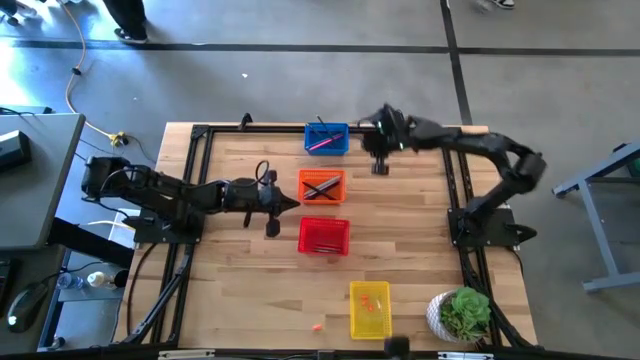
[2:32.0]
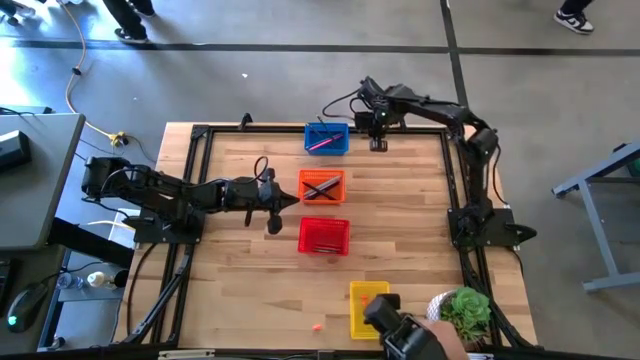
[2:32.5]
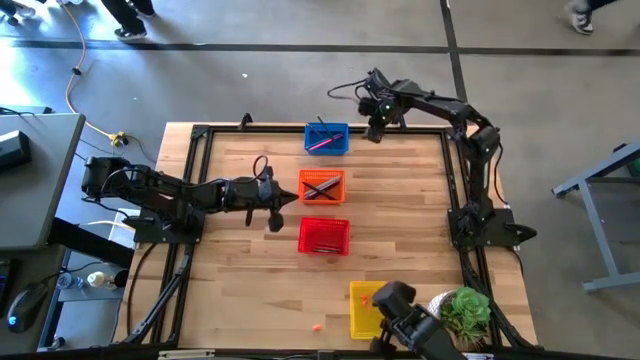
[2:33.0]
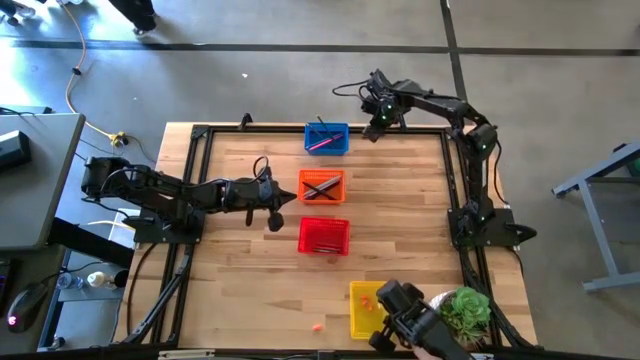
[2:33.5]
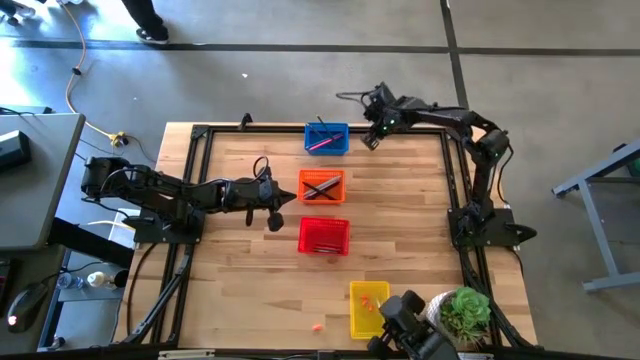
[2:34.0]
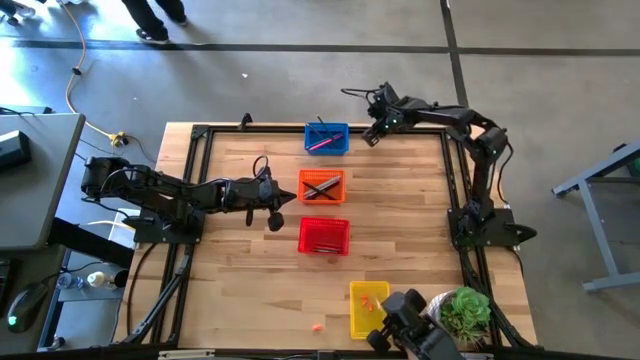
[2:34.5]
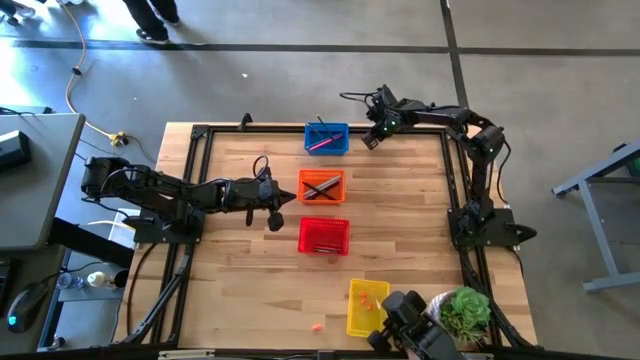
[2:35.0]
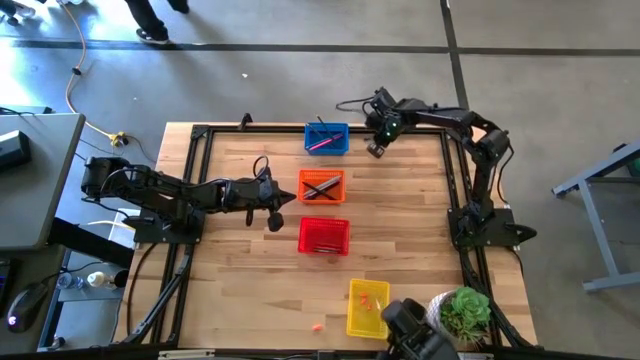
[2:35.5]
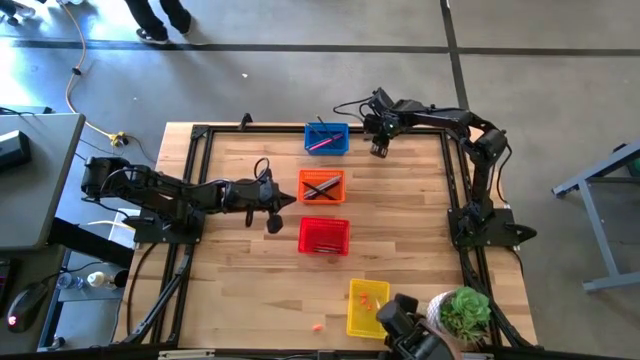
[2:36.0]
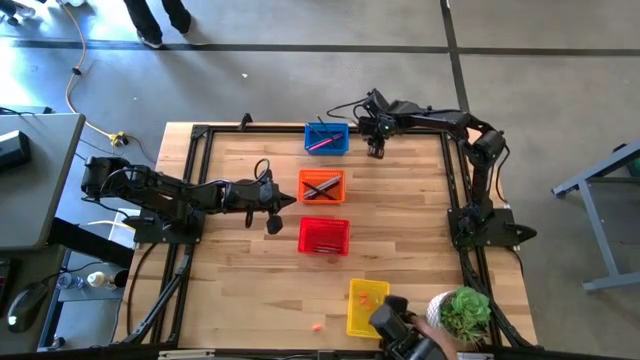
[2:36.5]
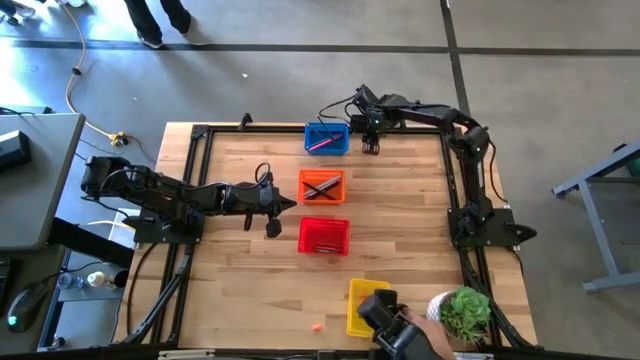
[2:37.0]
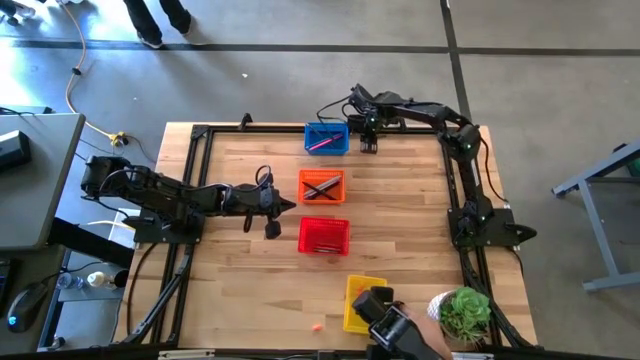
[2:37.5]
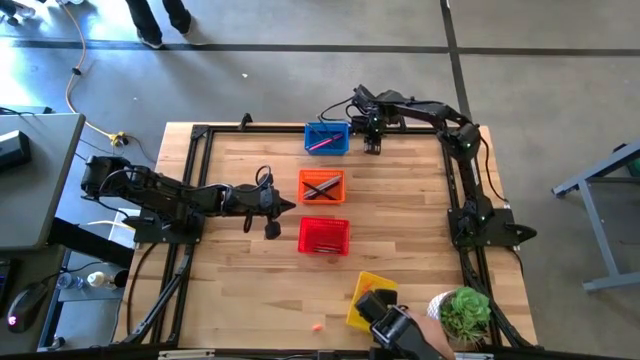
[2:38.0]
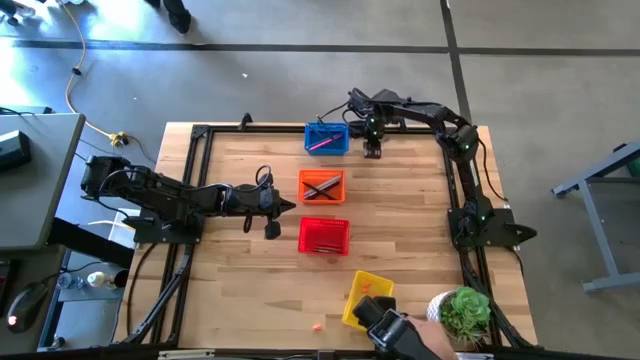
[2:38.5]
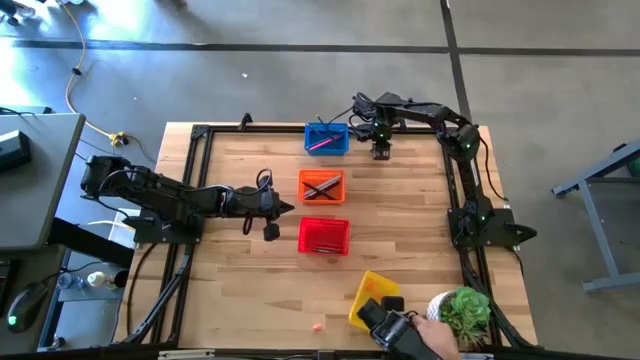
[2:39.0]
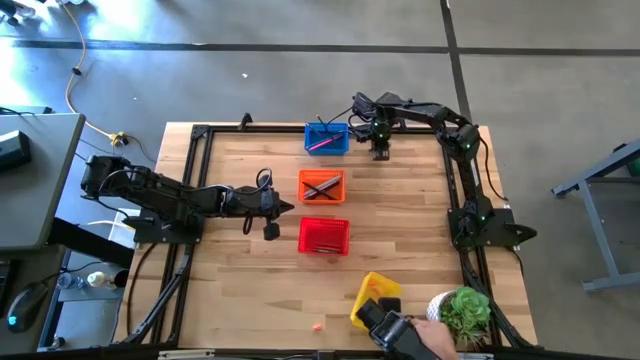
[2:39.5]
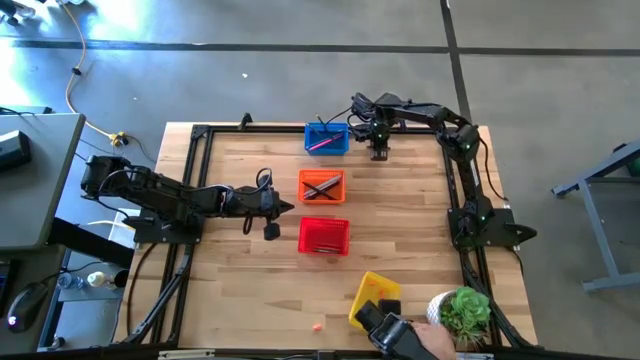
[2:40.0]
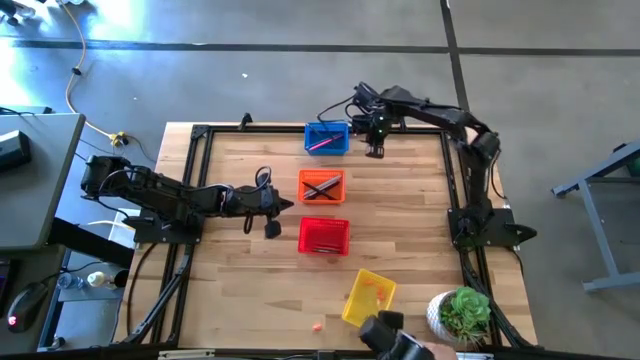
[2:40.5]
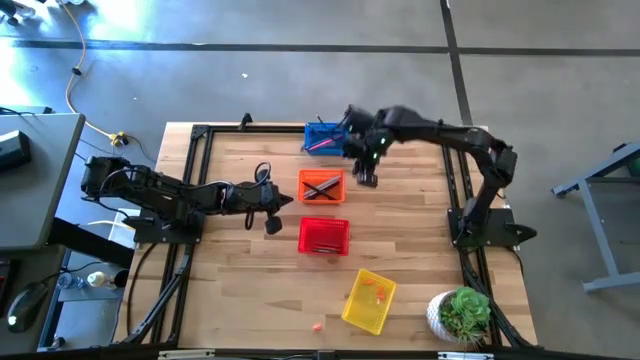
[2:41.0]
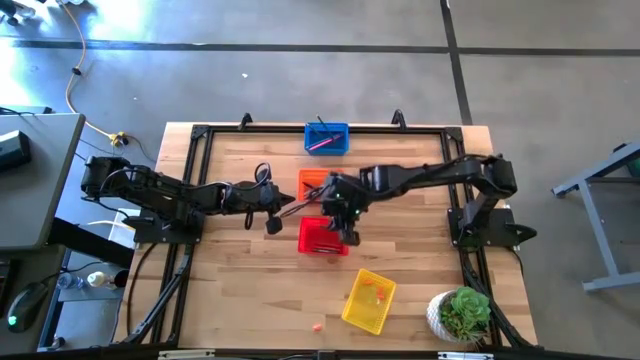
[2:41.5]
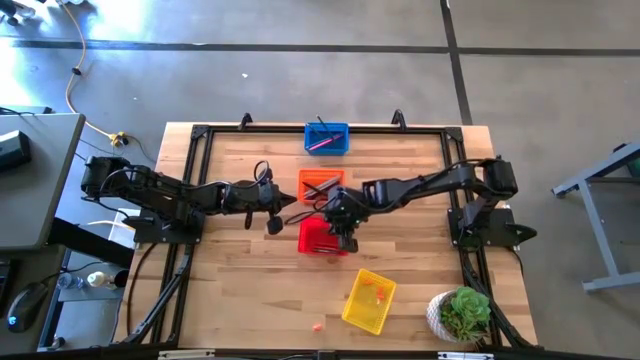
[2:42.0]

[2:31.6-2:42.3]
Task: Sort crayons/erasers/pens/pencils in bins
Put the green crayon into the red bin

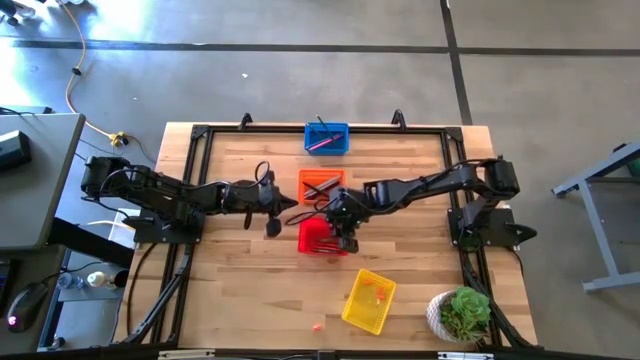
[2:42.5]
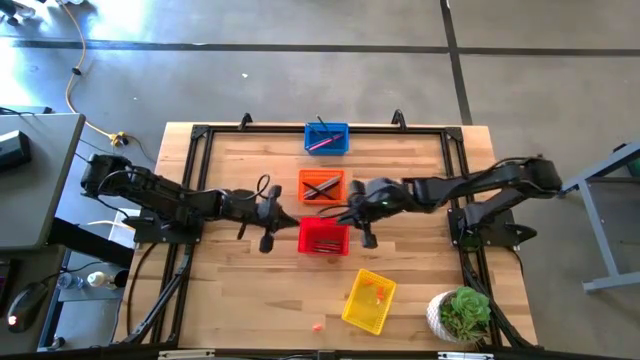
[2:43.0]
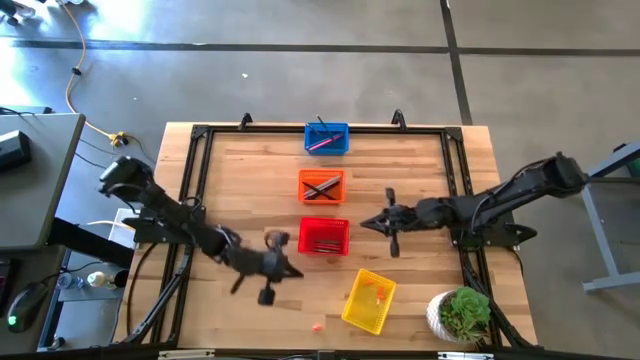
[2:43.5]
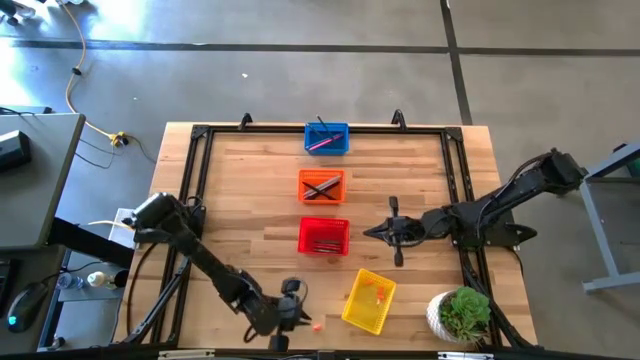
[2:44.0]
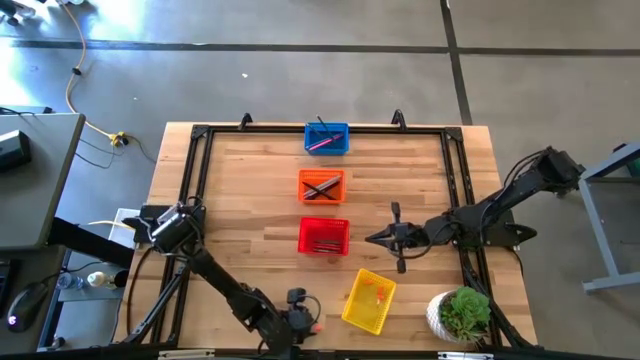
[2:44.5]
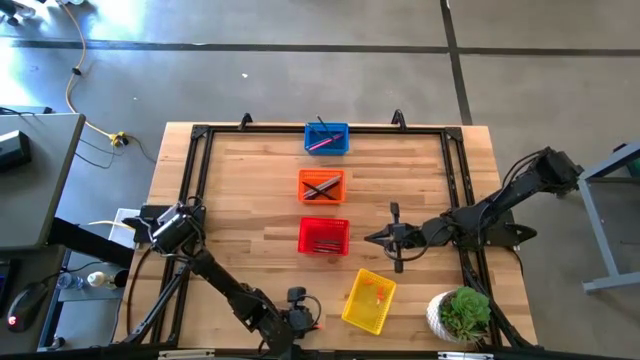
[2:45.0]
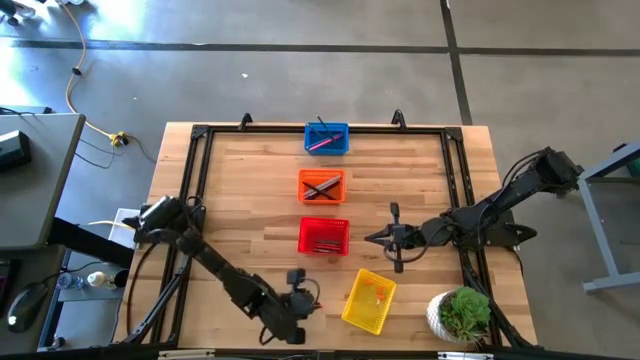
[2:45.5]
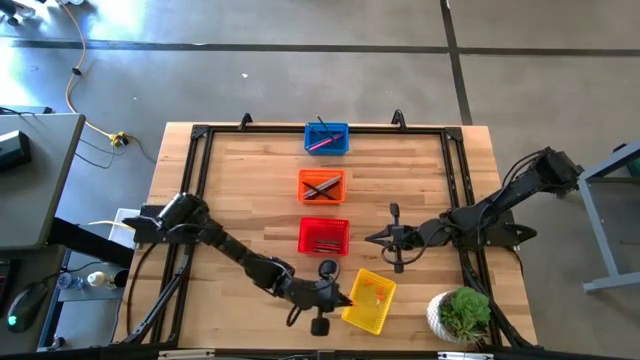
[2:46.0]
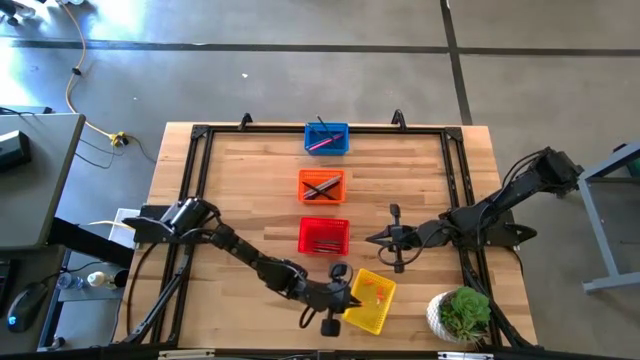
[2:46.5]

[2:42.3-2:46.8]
Put the orange eraser into the yellow bin

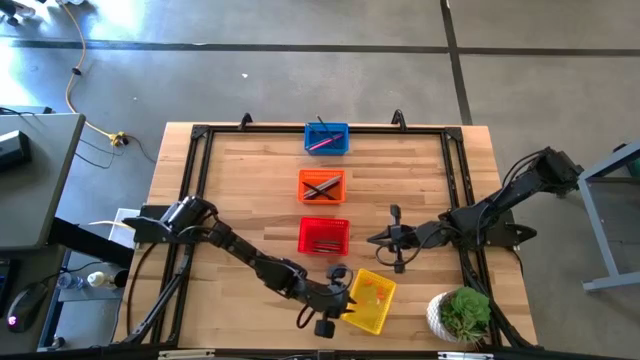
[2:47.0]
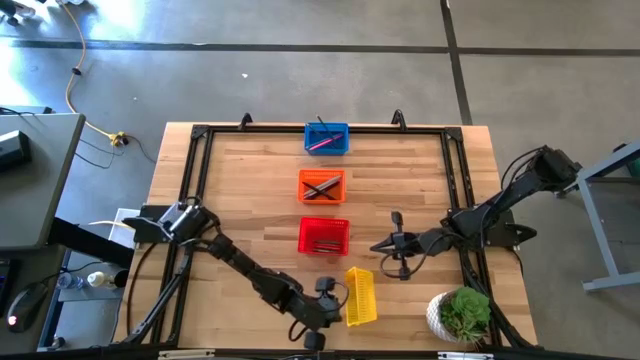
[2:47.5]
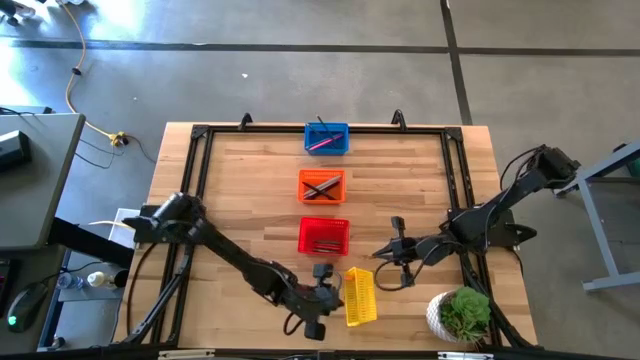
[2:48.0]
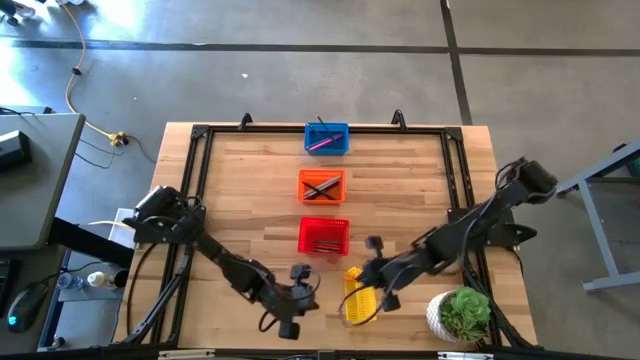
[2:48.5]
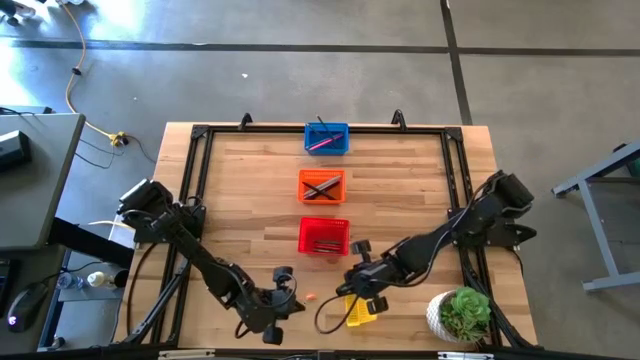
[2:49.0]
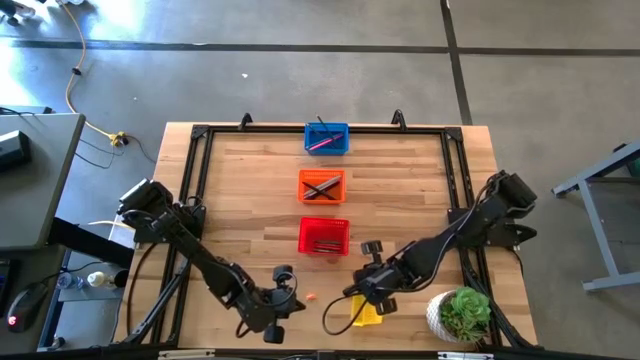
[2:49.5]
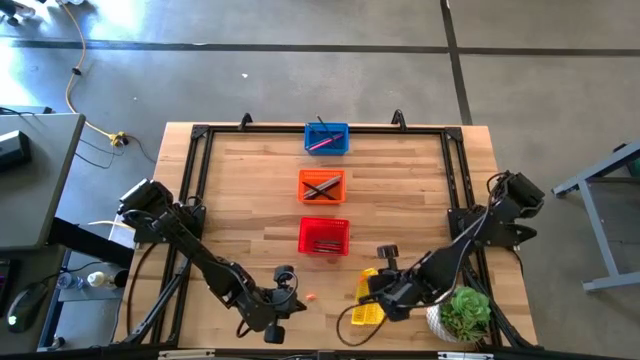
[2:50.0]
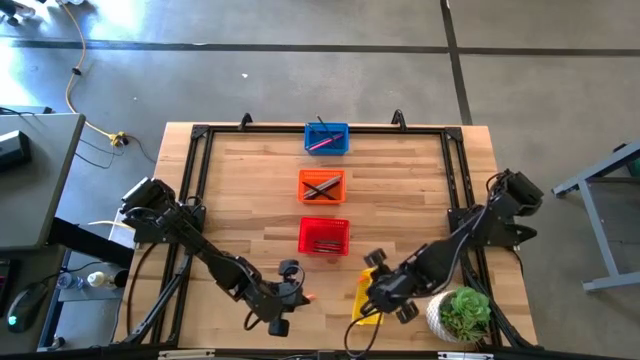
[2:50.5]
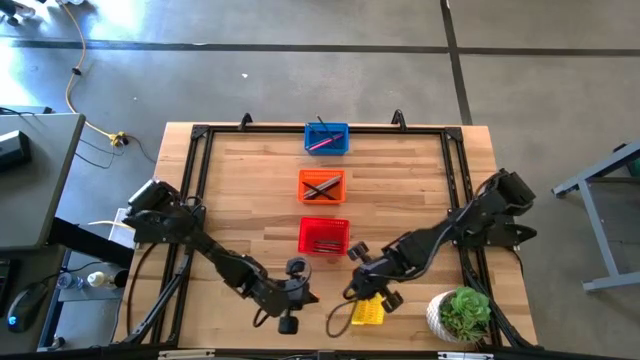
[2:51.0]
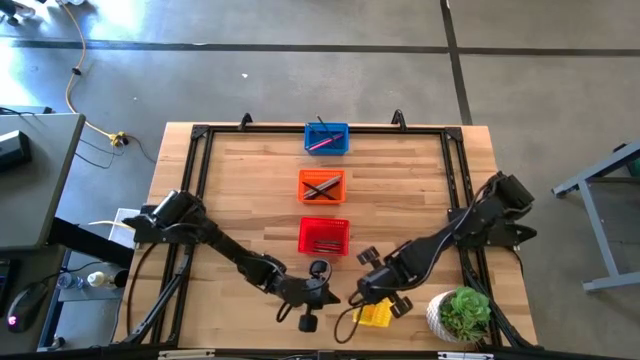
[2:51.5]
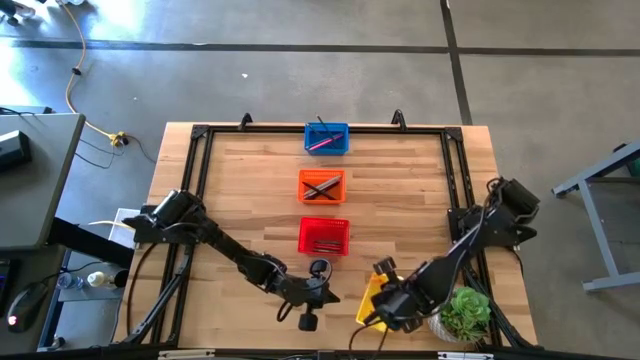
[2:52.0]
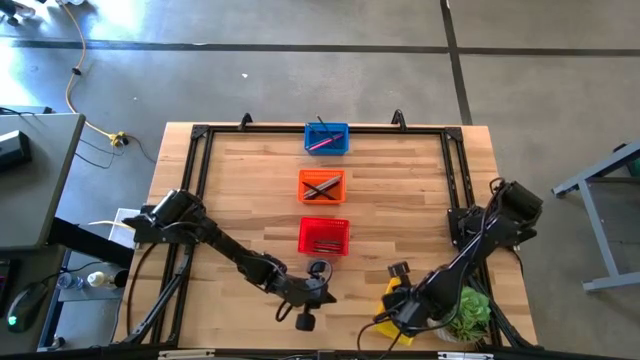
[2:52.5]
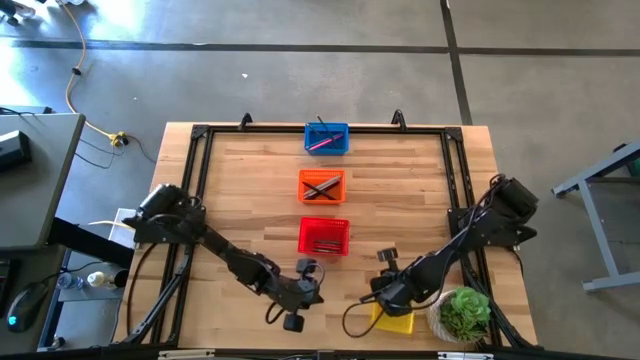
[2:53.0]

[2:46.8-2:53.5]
Adjust the yellow bin
